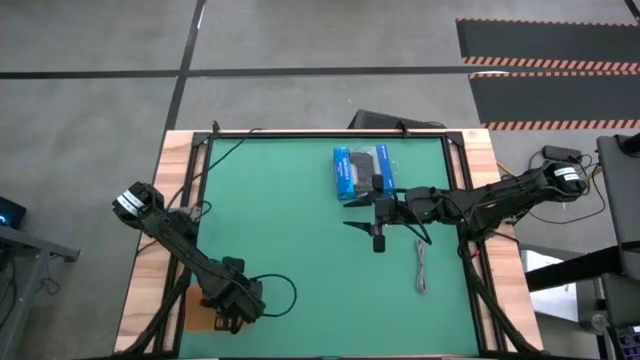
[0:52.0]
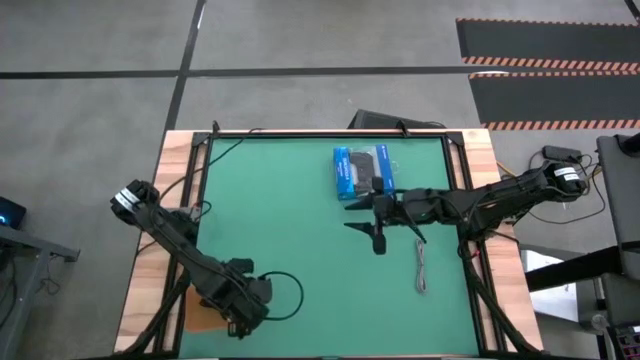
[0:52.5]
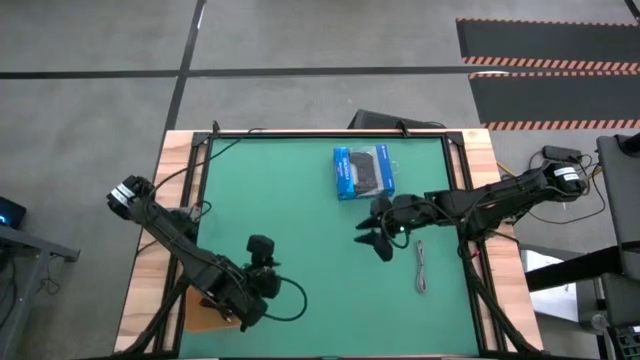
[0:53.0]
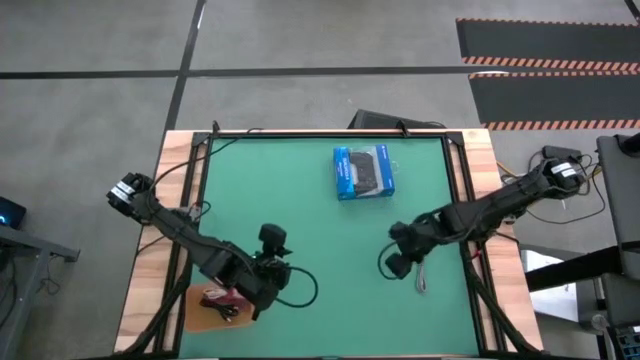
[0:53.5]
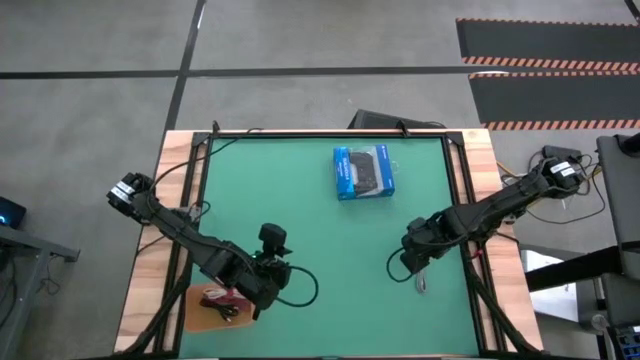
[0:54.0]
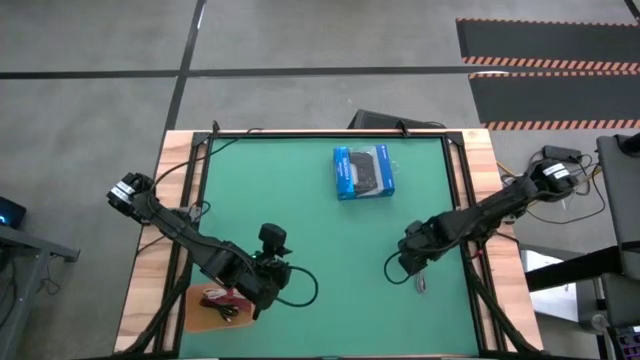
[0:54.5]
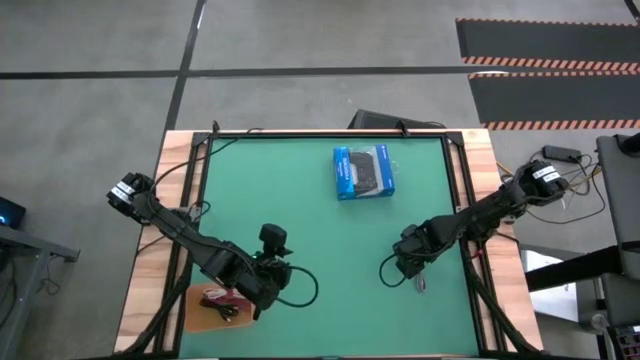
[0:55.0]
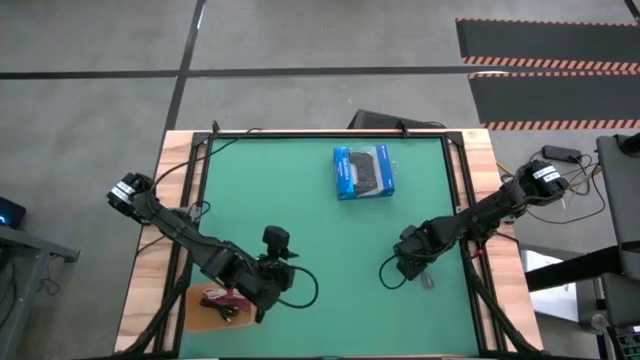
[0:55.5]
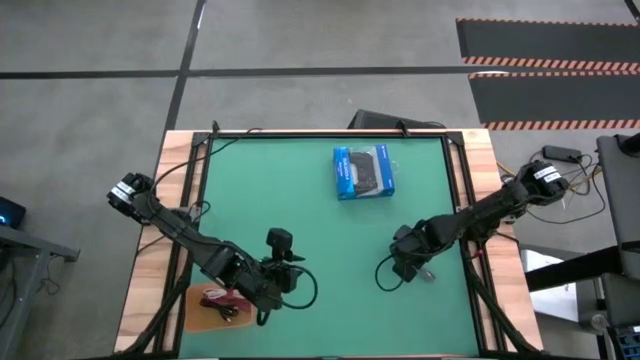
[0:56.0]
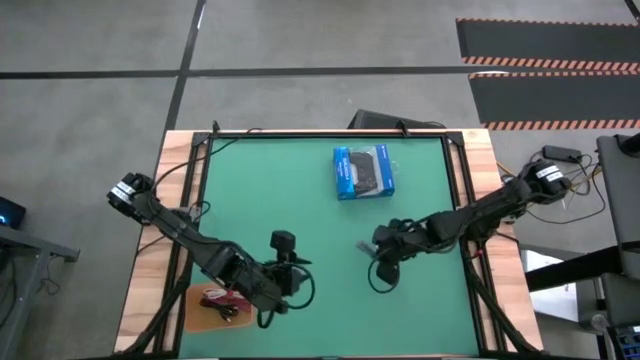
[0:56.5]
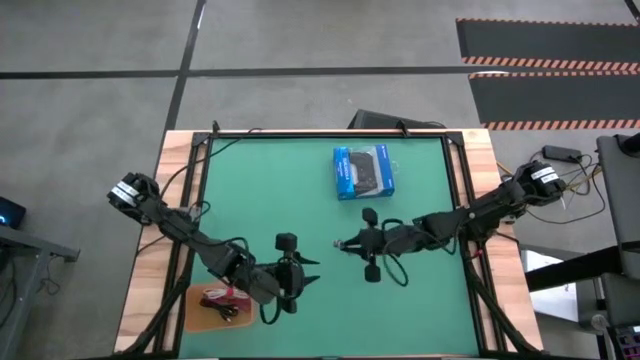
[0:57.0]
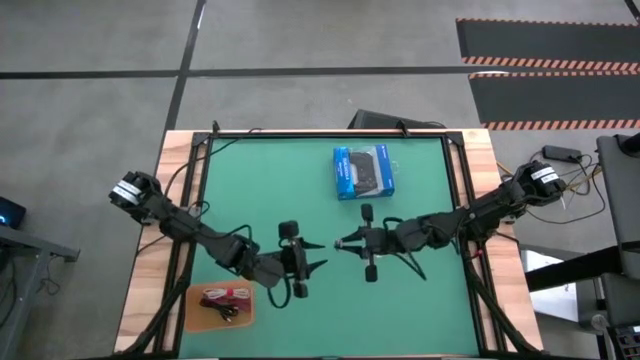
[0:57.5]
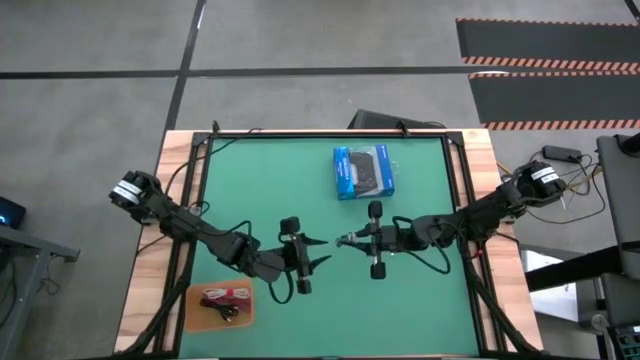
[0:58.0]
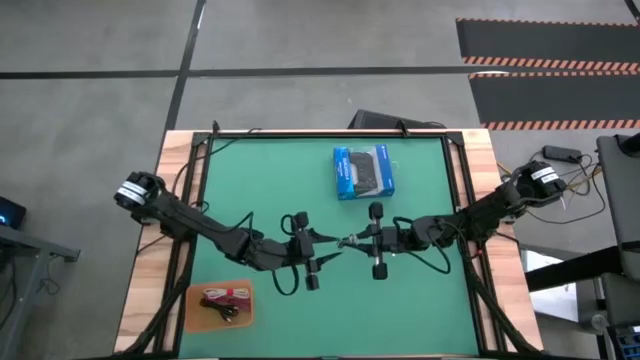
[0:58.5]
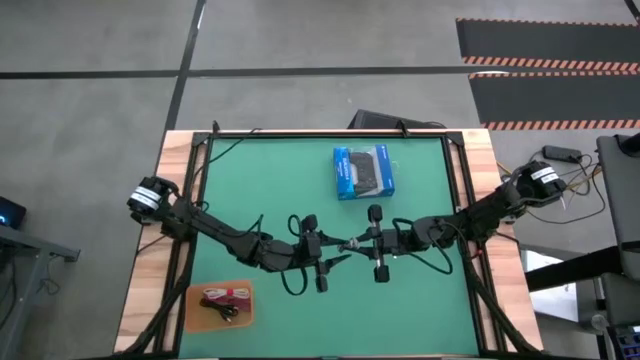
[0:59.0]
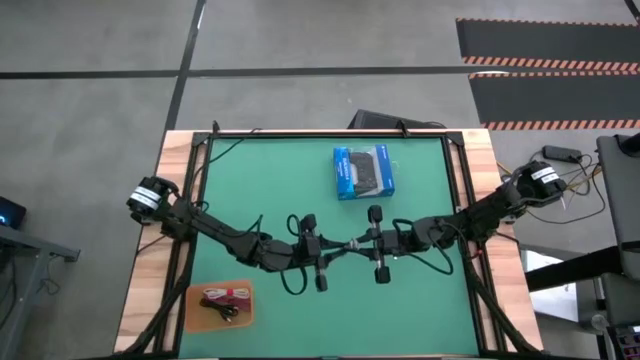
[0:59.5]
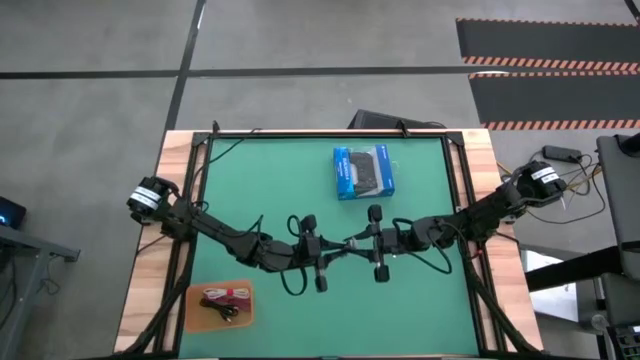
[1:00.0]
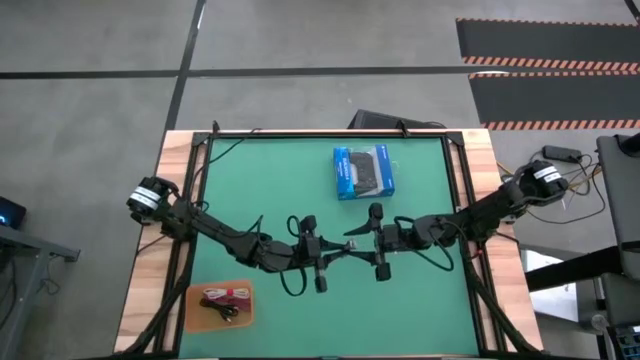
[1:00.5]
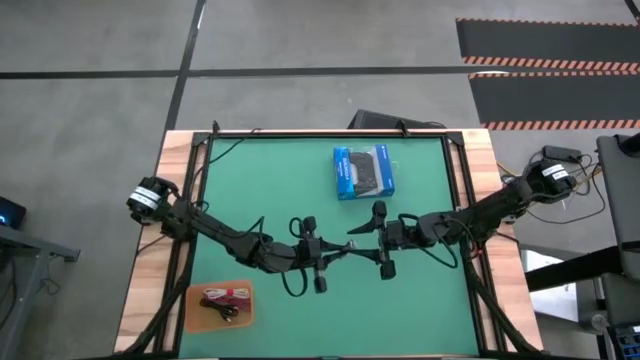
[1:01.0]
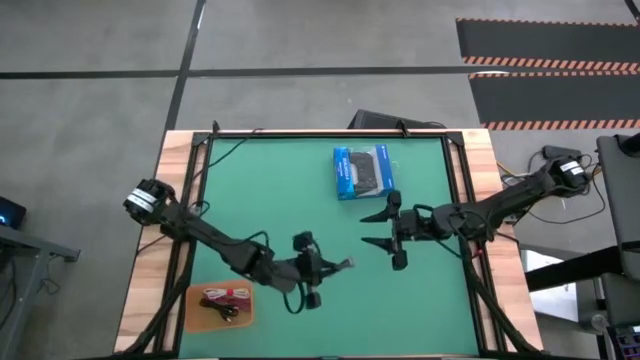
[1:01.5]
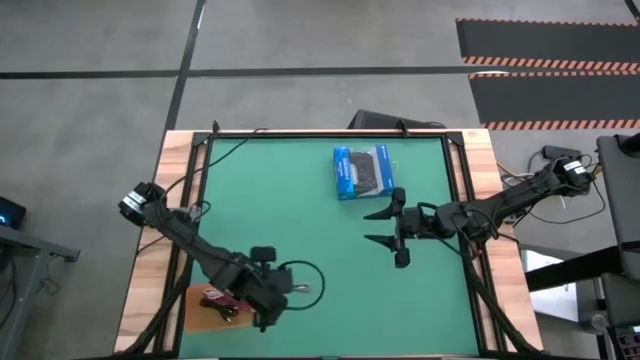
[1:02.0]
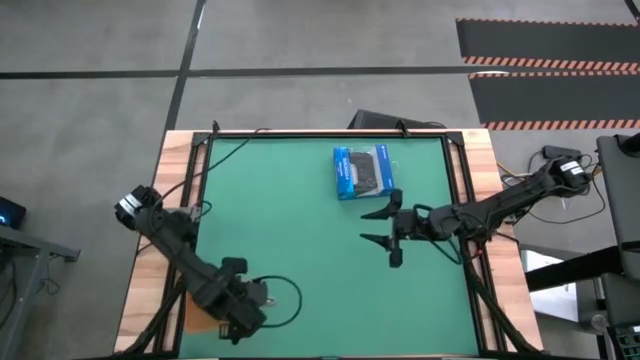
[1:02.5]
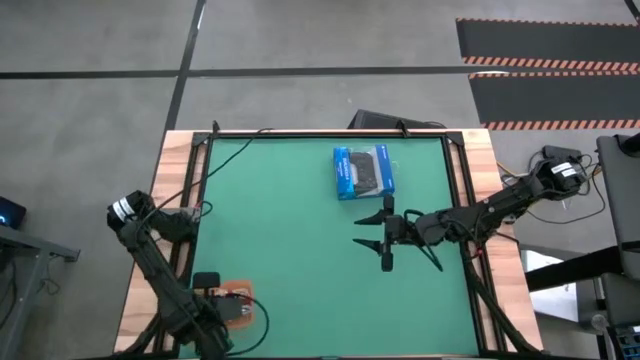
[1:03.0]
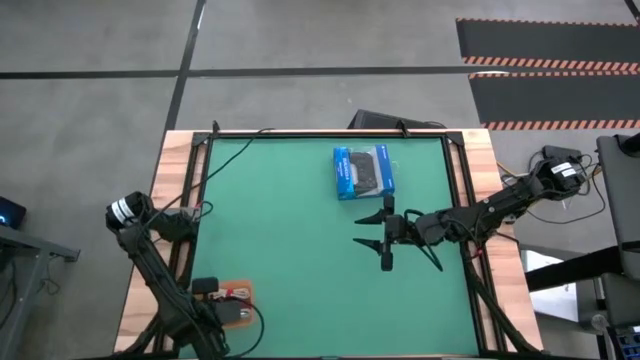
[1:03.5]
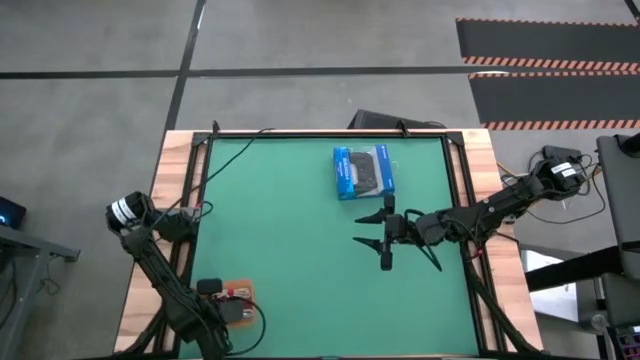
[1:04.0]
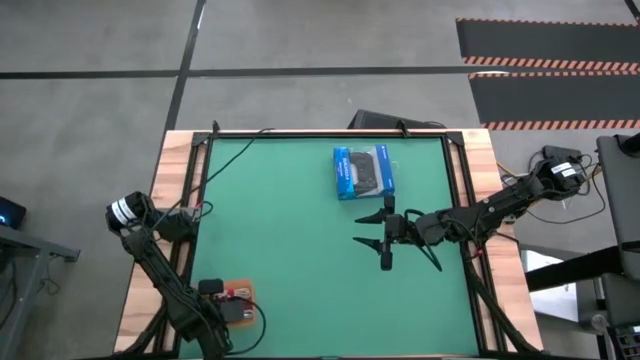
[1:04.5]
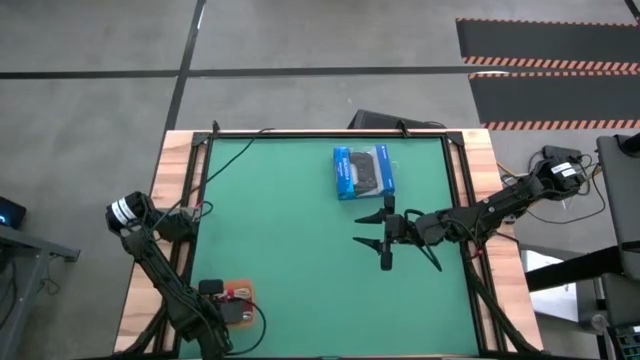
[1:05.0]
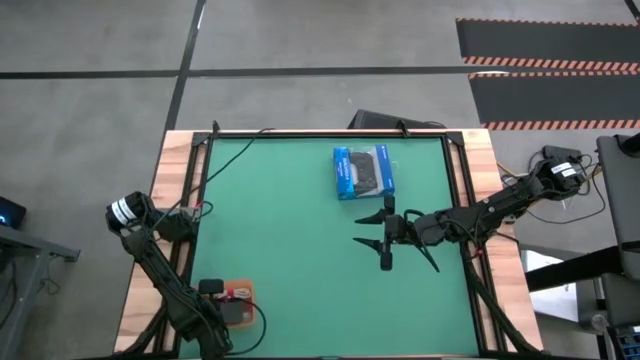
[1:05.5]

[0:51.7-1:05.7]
Task: Pick and place USB-C Cables
Put the white black charger cable into the orange bin

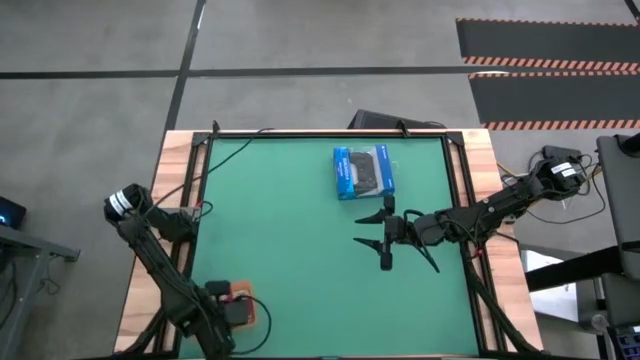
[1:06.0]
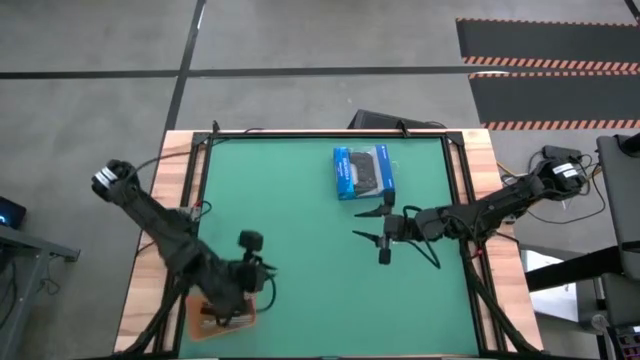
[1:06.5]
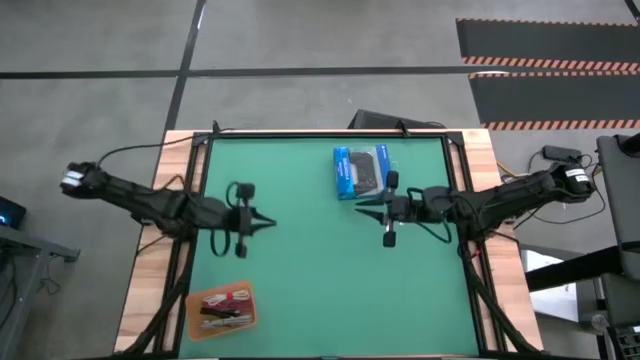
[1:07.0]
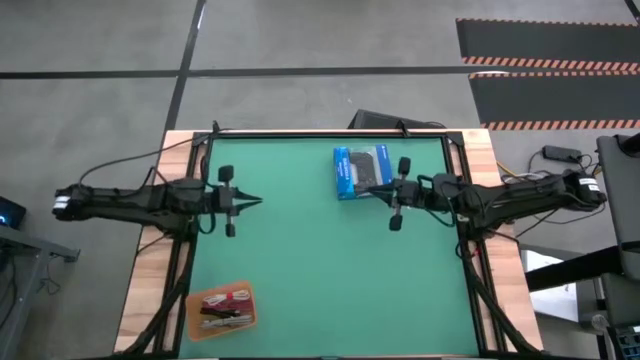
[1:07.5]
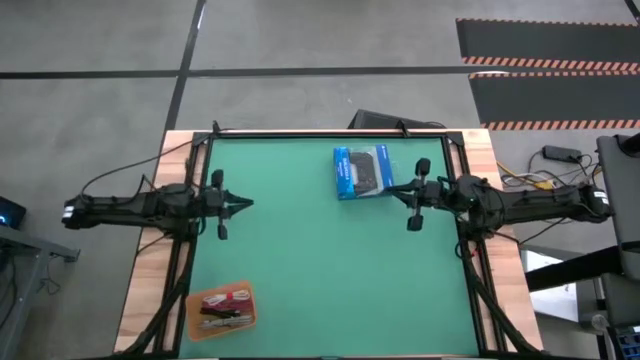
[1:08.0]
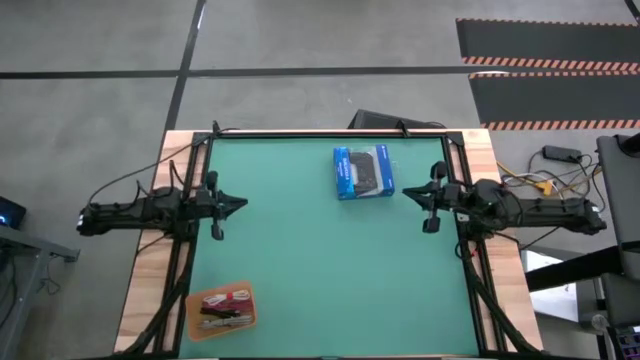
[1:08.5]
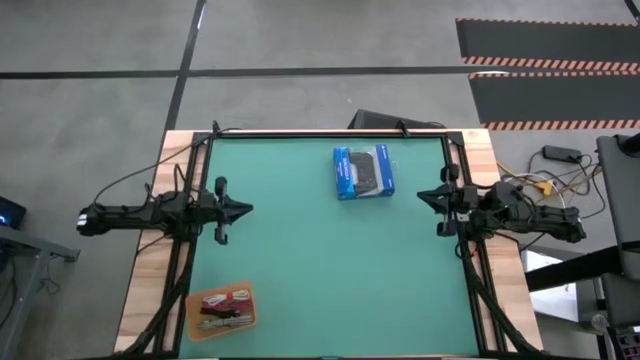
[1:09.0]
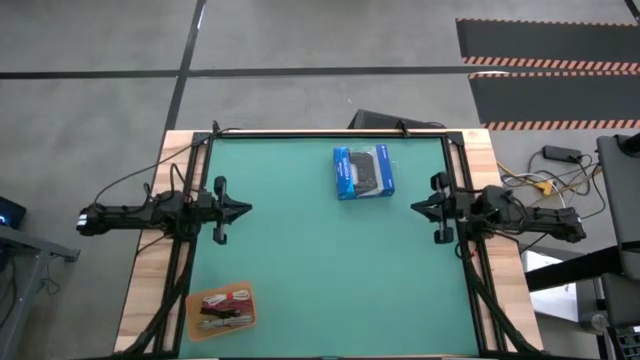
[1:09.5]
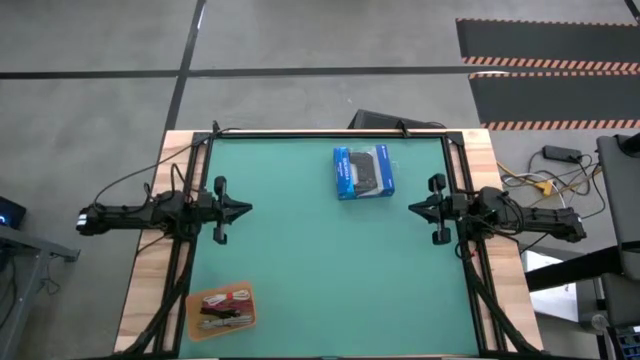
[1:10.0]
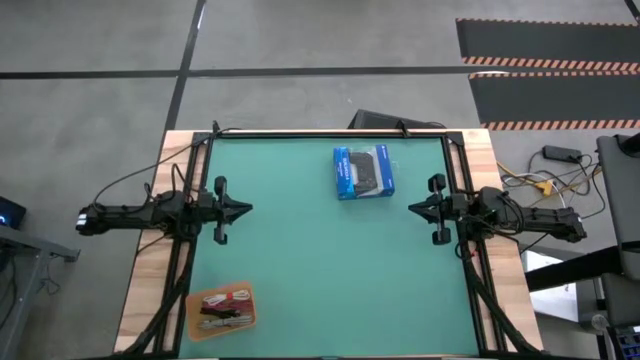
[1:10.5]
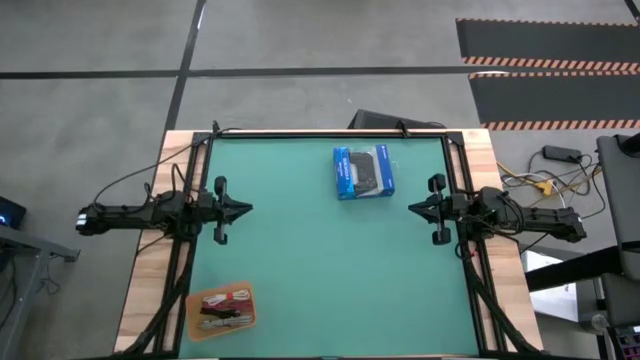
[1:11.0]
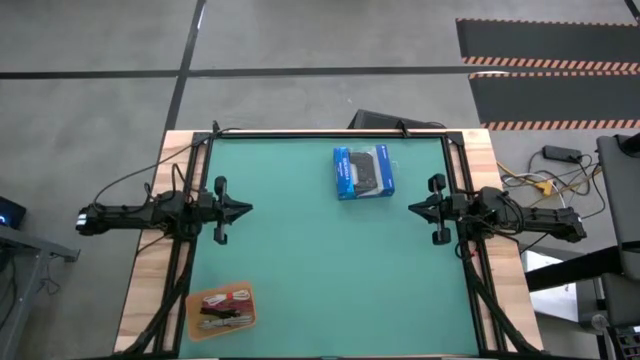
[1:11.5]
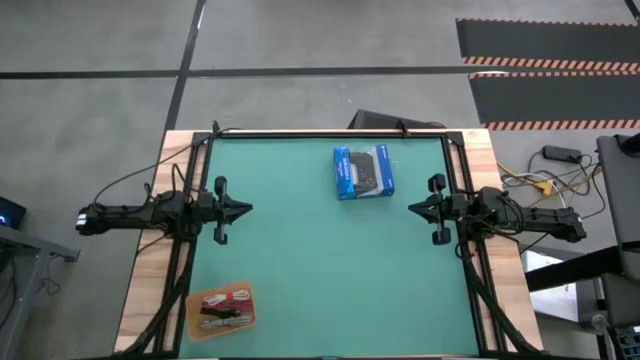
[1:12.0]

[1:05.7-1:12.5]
Return to Home Position
